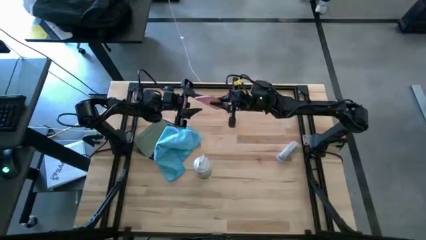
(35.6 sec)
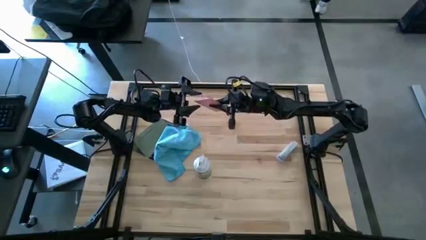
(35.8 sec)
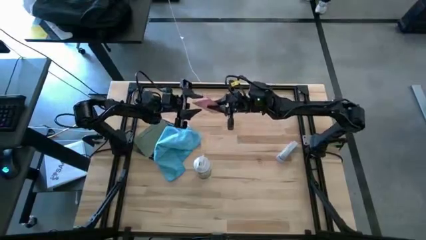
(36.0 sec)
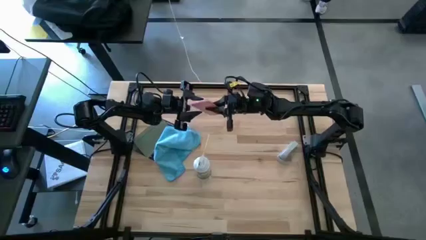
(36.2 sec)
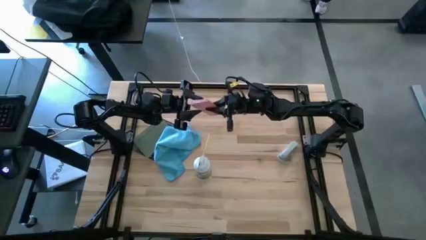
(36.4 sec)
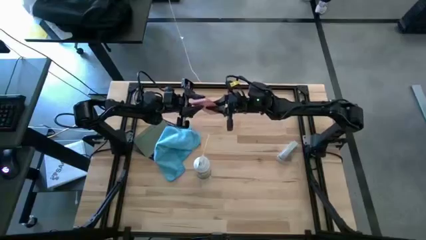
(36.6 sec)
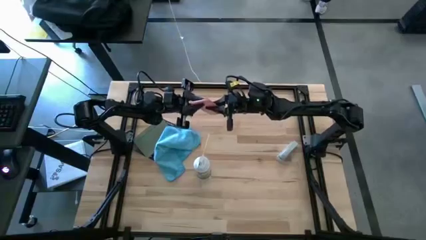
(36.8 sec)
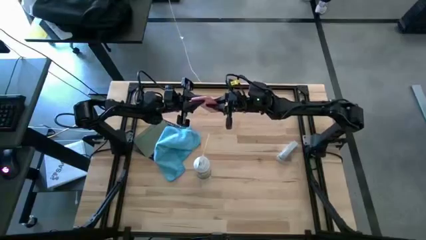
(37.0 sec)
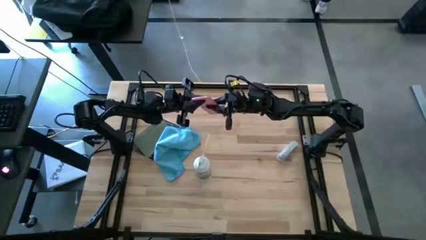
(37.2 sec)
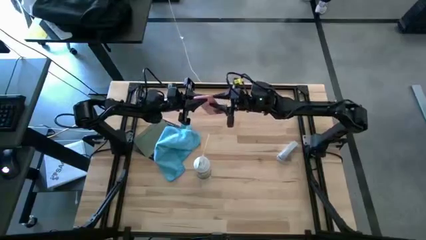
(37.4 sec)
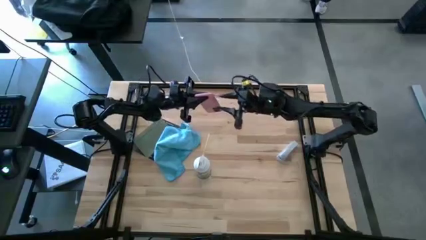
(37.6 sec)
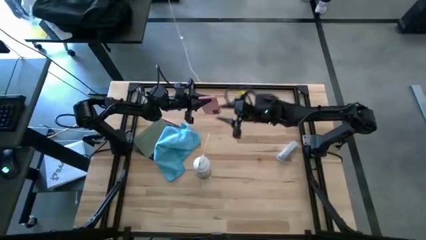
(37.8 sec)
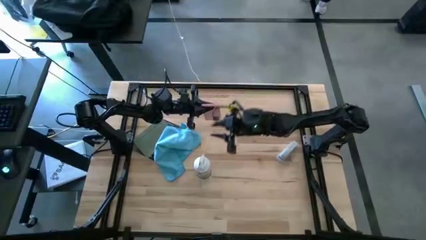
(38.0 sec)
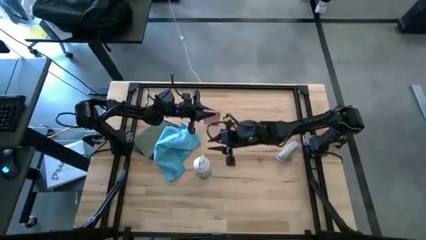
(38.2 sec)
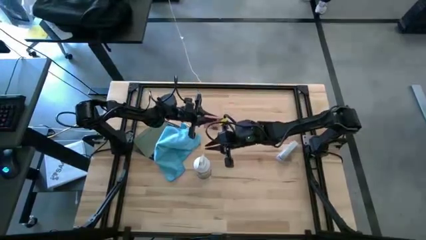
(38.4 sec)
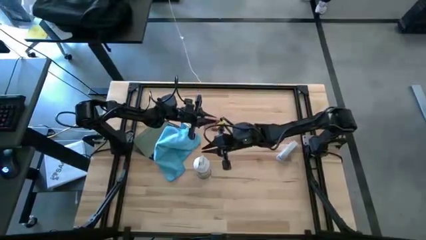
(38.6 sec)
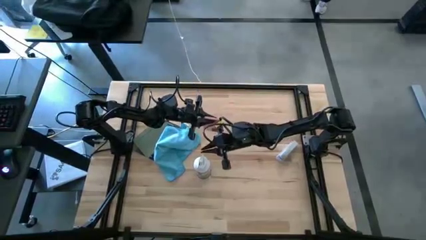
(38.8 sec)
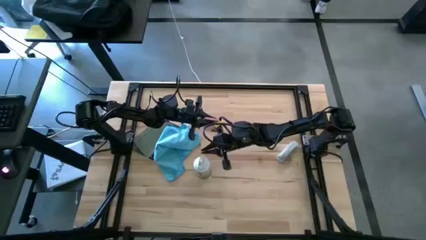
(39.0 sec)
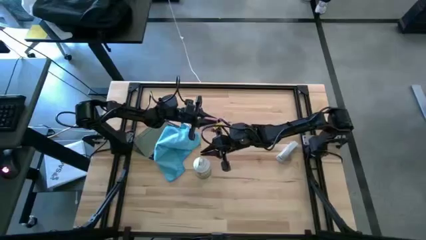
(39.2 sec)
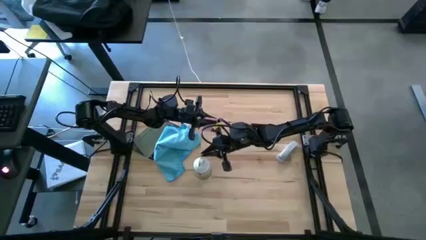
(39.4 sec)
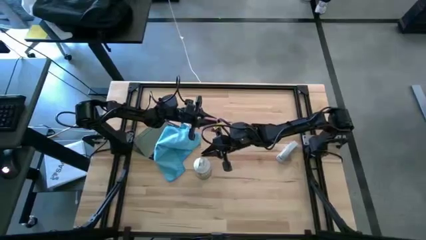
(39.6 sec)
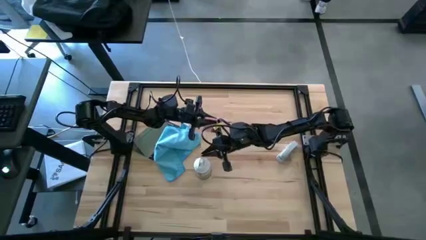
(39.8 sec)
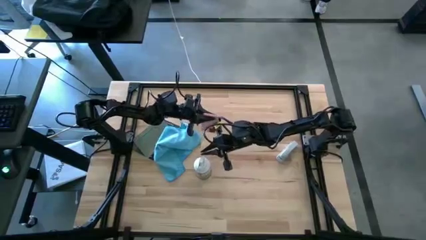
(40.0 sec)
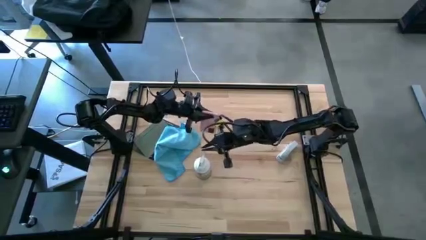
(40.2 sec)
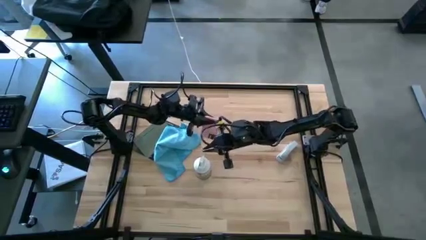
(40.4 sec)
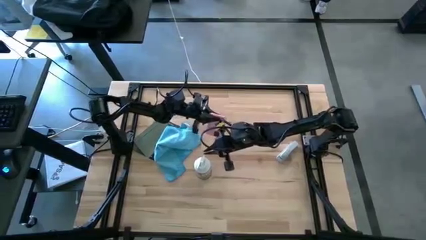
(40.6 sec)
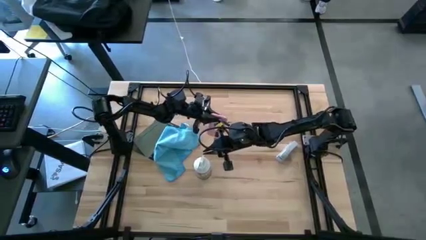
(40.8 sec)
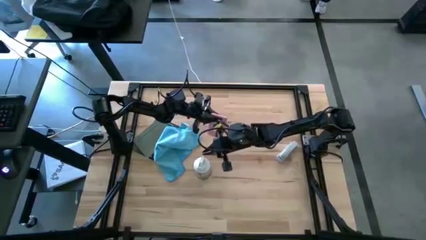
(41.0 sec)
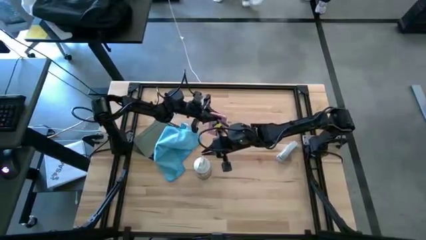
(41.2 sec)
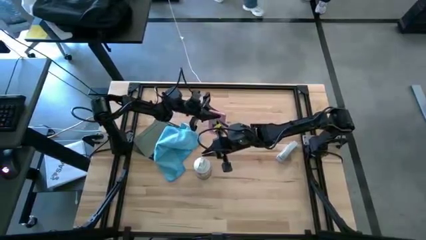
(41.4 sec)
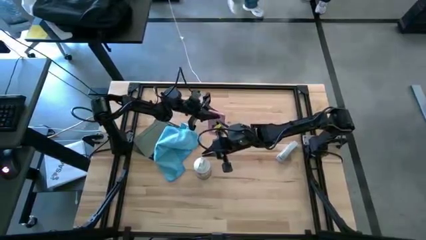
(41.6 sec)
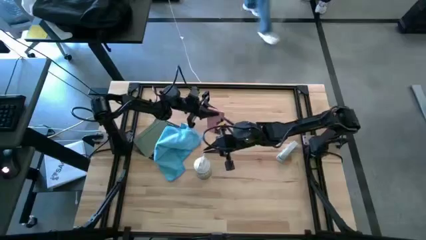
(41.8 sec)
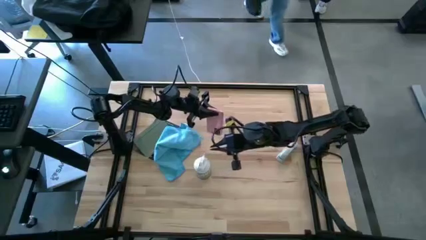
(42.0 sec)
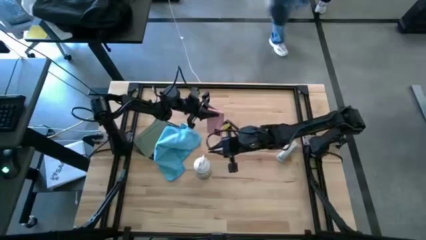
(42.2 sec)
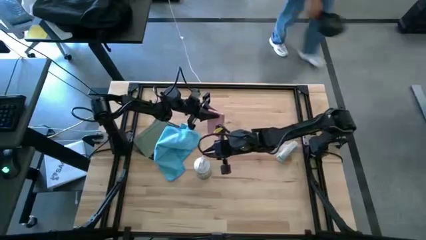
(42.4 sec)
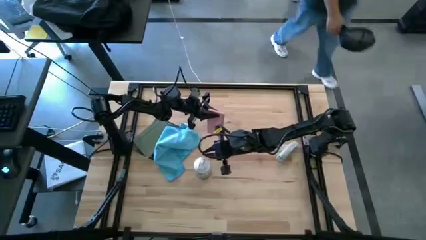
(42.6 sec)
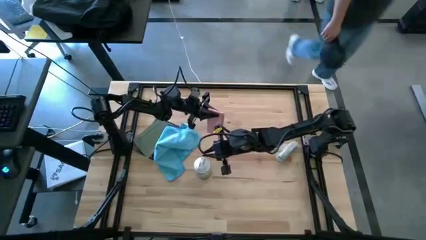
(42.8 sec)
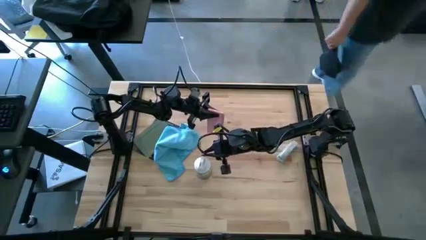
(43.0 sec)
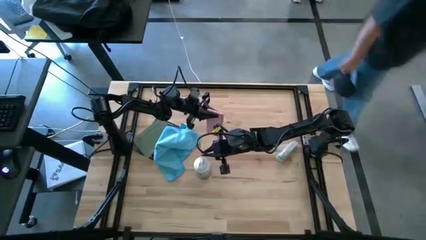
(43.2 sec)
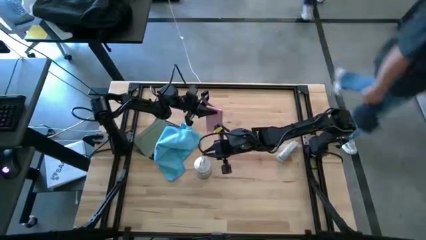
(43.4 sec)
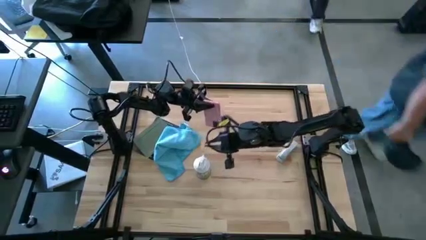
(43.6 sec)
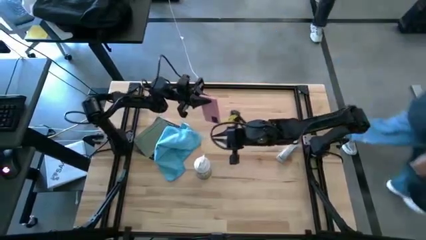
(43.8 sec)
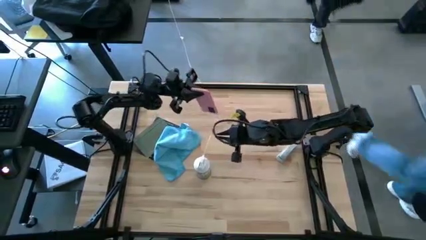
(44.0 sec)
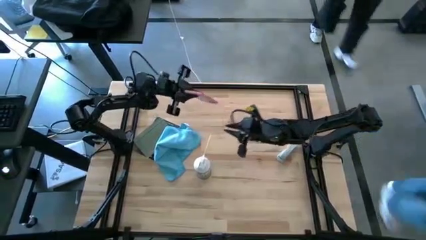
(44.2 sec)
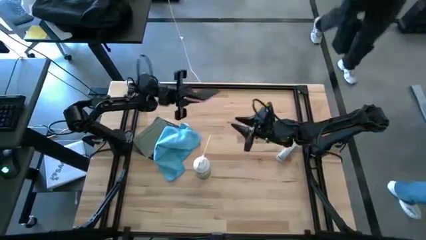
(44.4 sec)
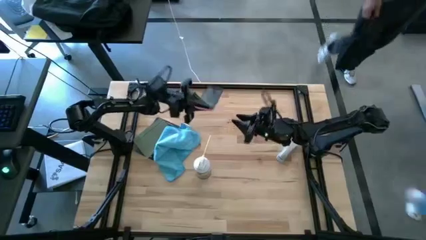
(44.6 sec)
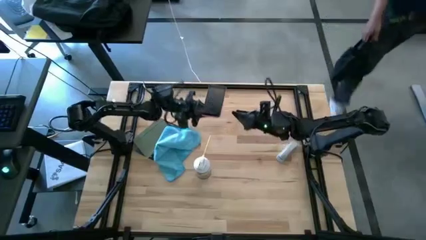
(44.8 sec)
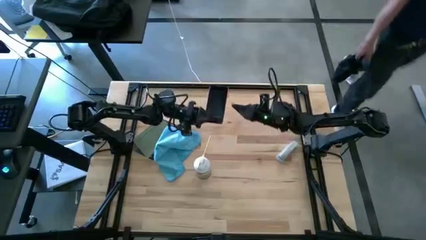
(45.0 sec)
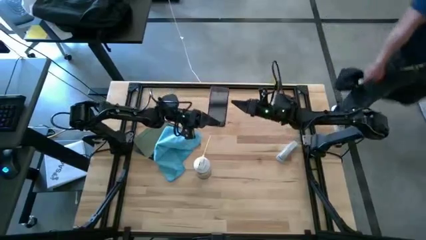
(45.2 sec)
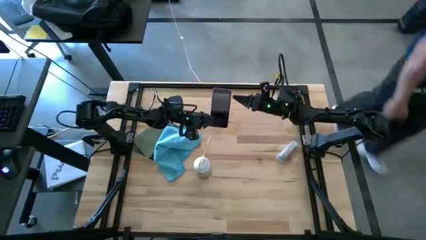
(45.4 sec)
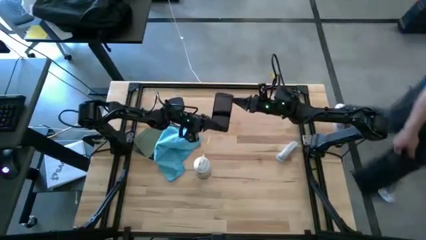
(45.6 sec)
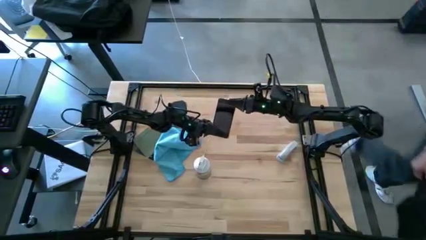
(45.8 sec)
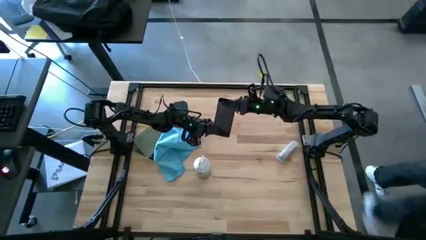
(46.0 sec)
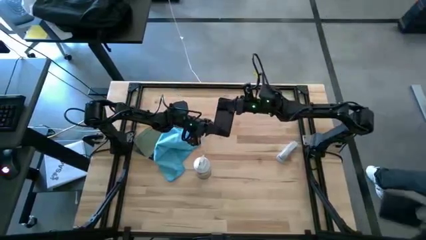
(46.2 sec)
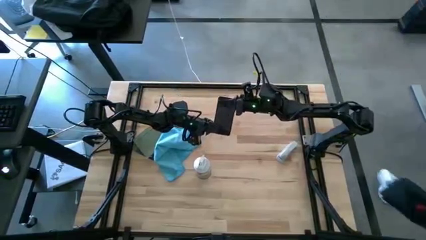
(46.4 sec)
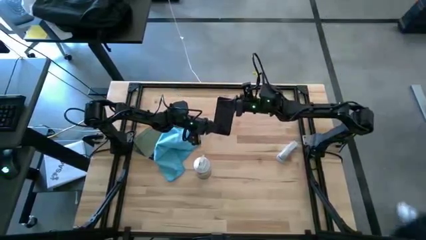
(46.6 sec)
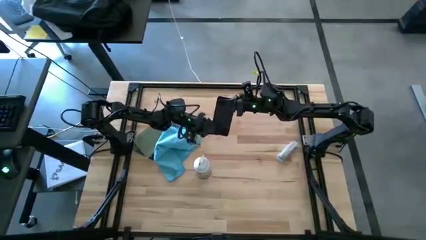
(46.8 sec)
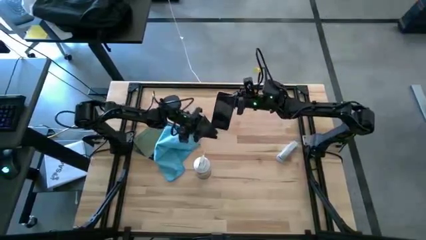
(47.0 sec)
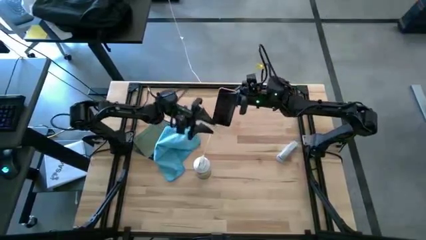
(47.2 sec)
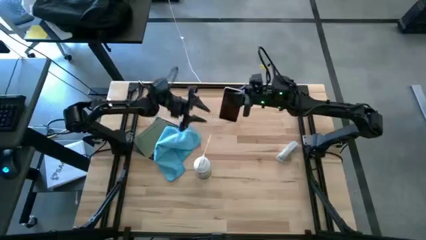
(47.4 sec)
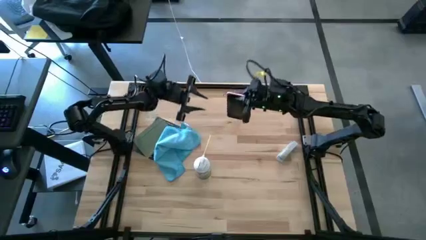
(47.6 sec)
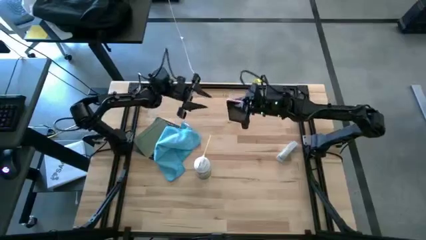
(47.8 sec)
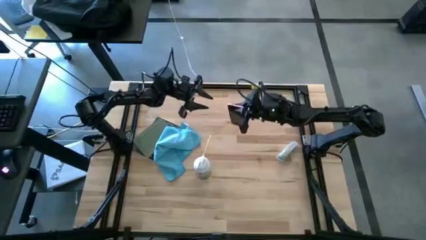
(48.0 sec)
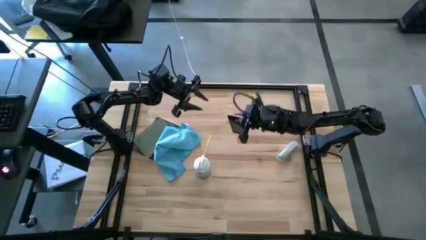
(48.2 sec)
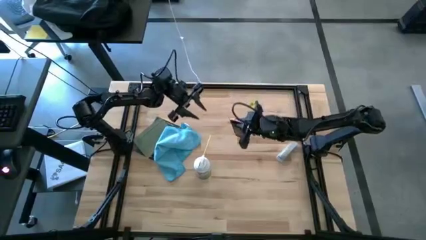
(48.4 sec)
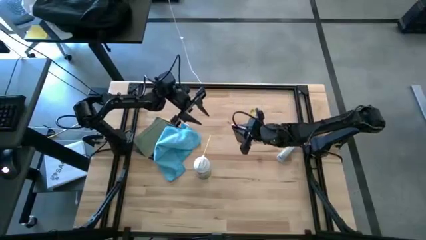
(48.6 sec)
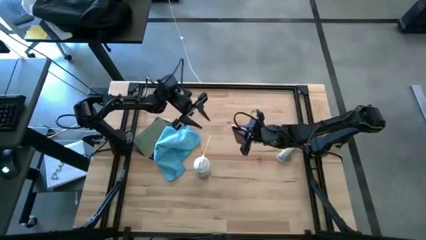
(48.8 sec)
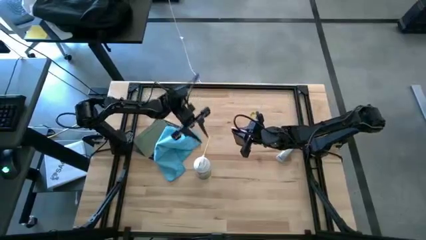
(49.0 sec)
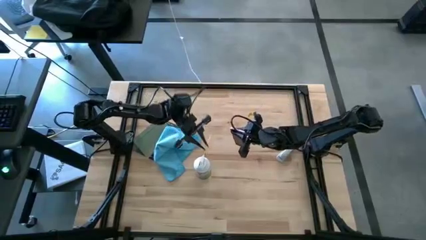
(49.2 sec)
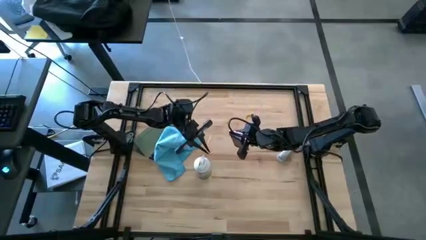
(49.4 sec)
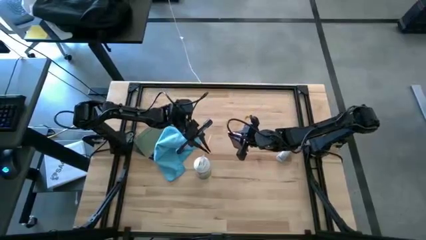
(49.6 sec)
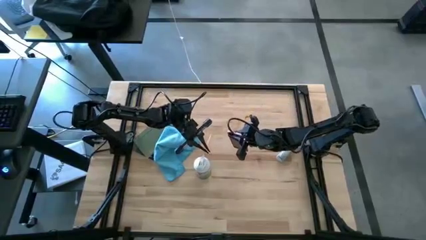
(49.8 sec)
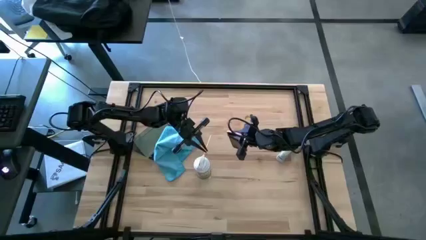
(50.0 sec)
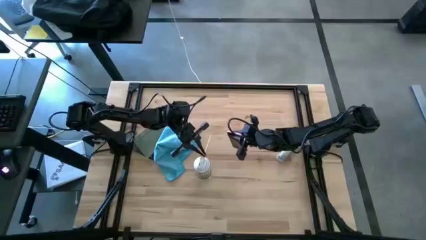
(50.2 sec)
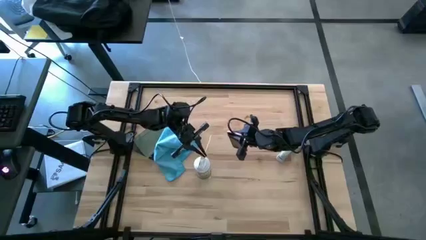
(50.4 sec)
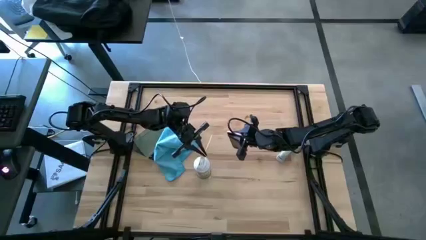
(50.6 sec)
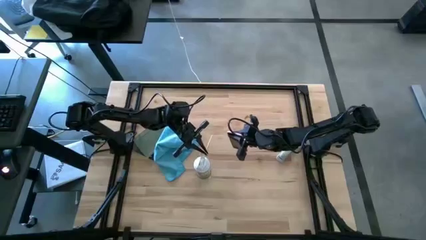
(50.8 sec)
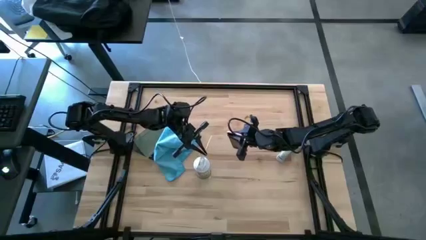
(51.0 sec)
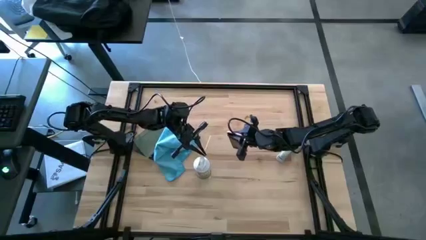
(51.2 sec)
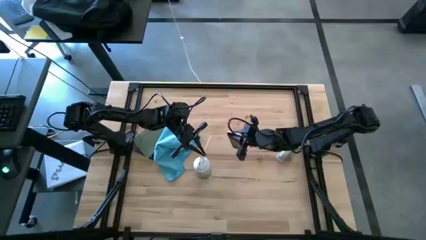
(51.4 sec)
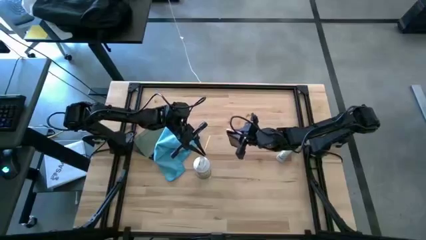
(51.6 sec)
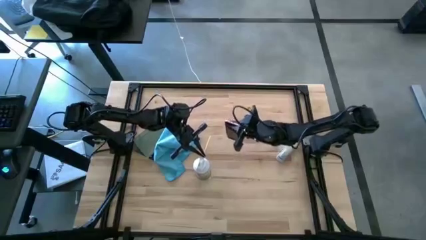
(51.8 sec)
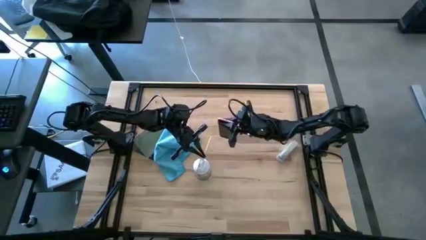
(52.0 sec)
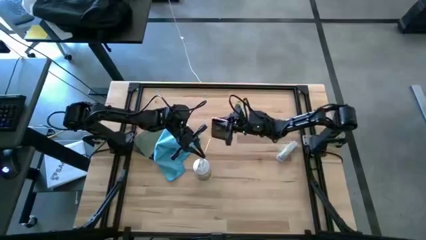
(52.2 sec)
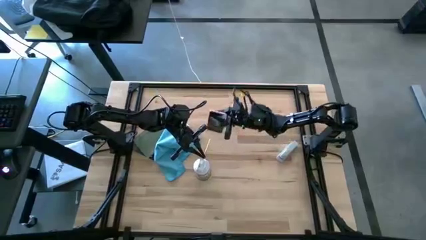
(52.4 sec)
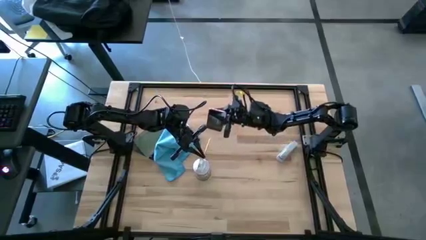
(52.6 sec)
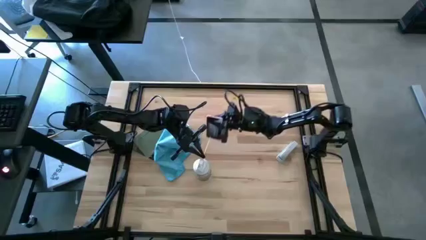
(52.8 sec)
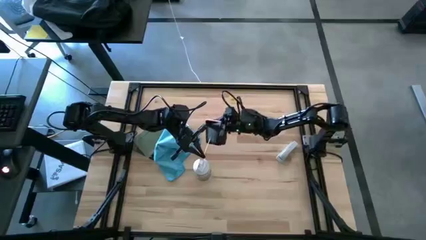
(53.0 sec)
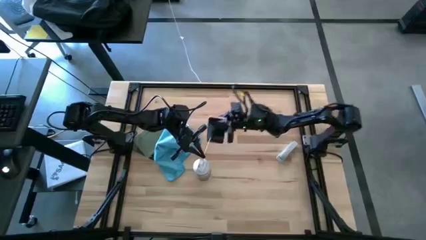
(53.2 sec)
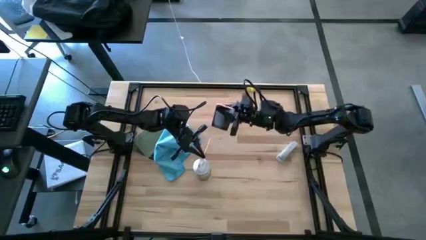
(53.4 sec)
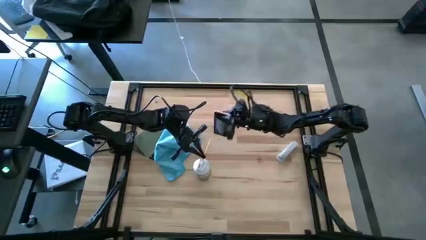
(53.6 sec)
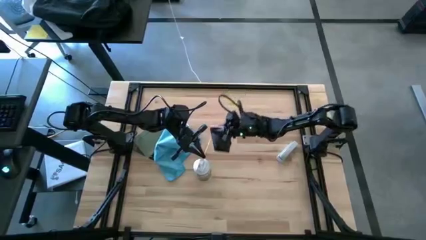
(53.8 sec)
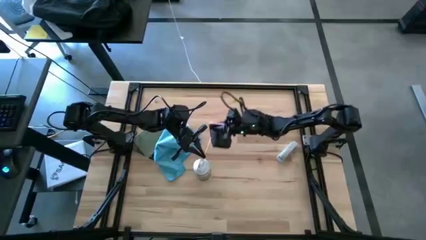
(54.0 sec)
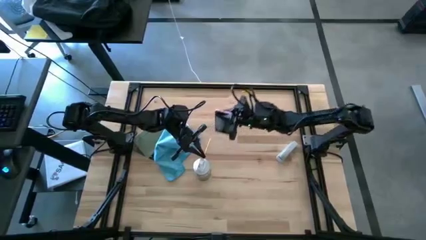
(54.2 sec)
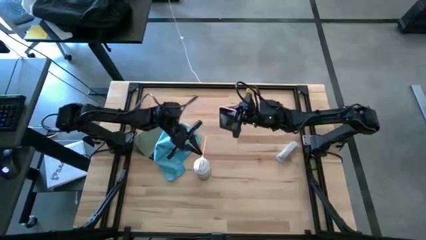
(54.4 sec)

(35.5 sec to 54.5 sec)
Task: Apply microfiber cloth
Spray the cellphone with the spray bottle cleaner
